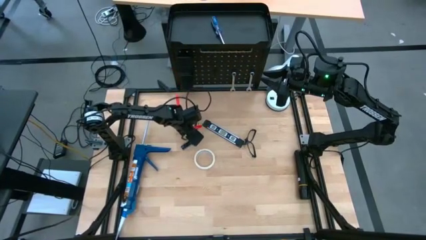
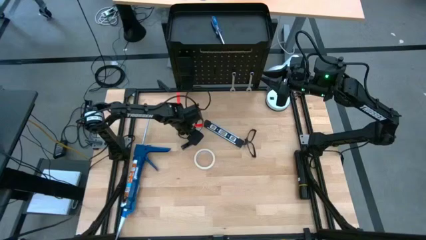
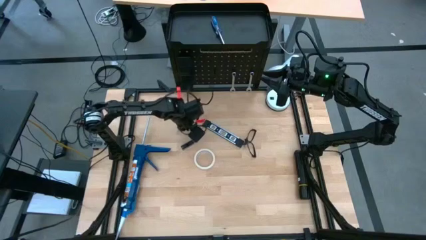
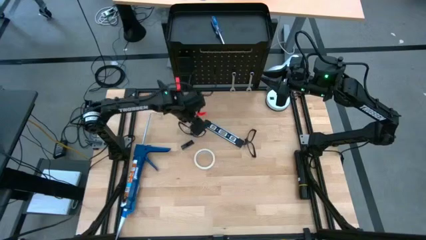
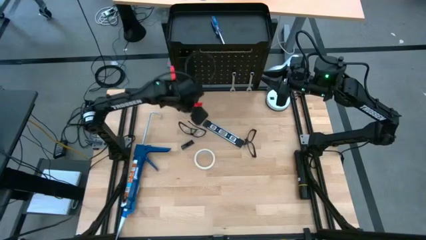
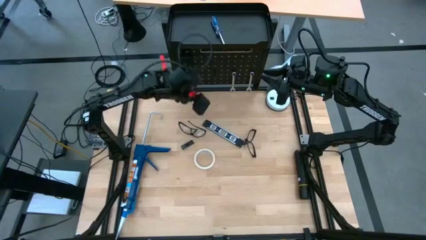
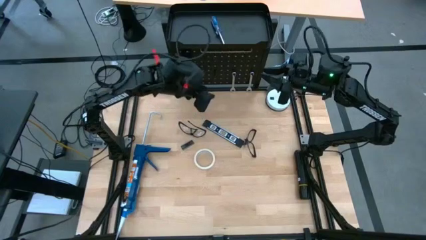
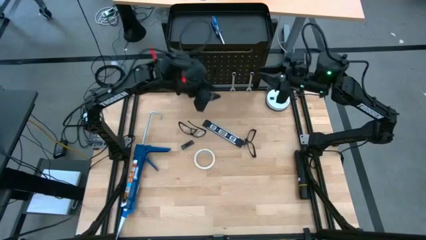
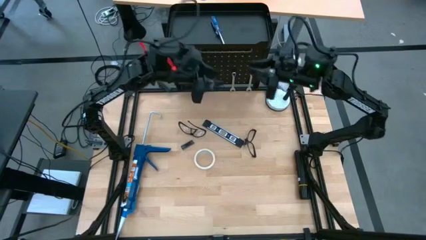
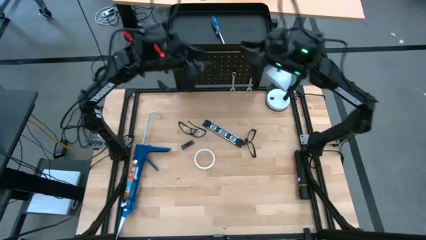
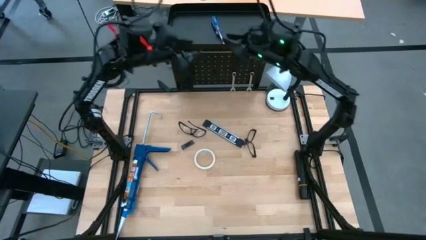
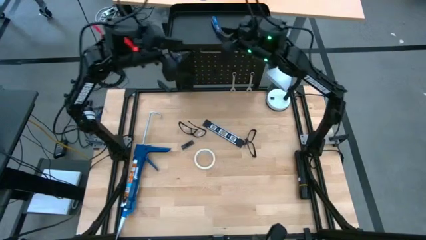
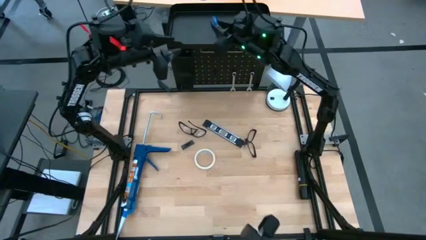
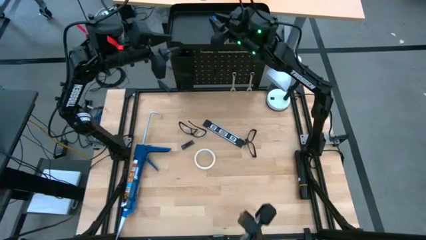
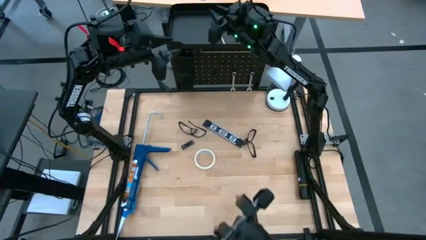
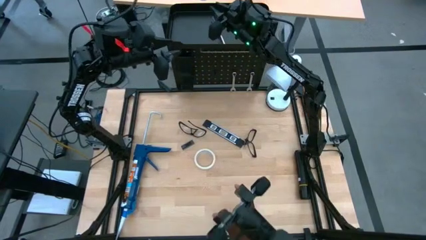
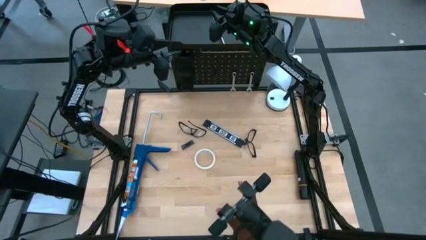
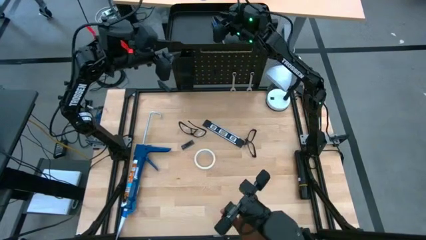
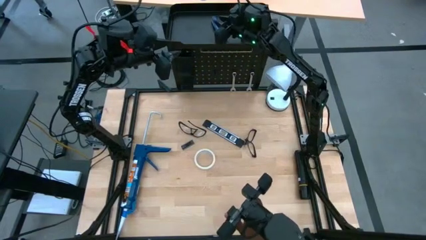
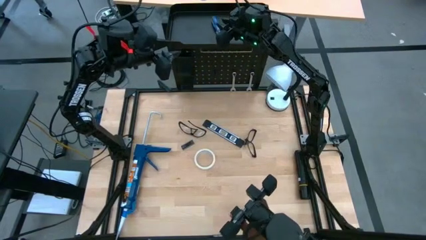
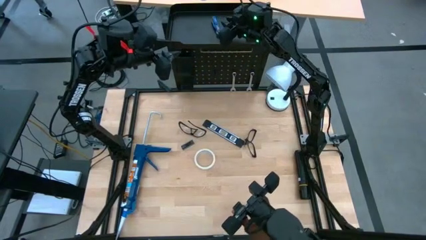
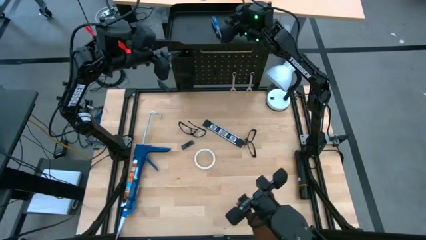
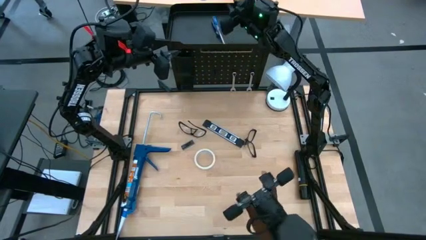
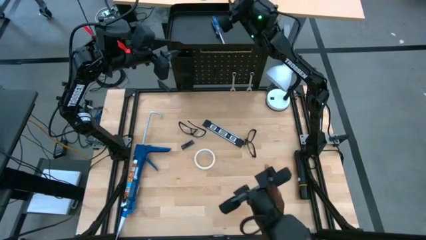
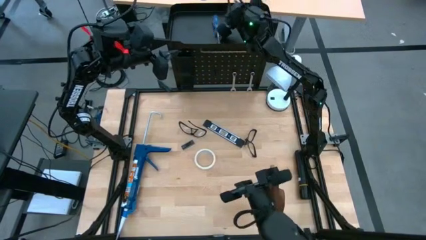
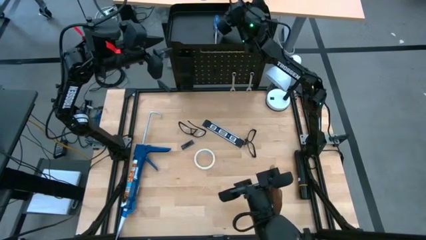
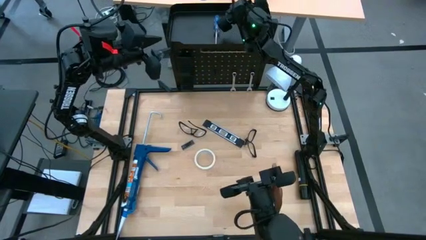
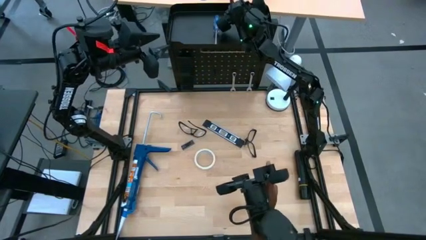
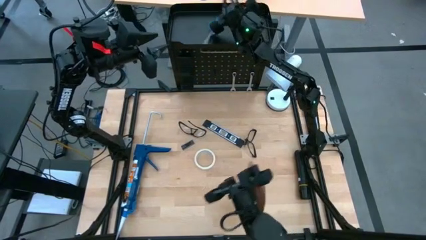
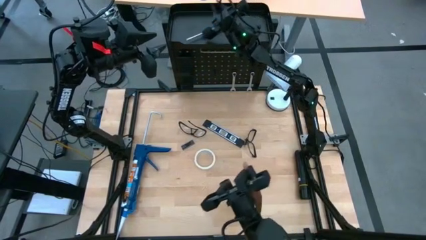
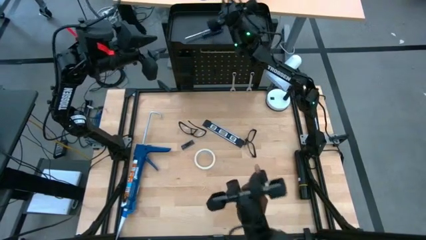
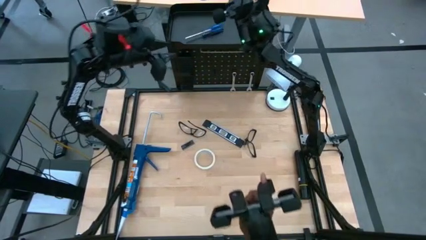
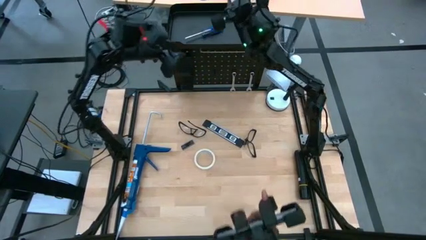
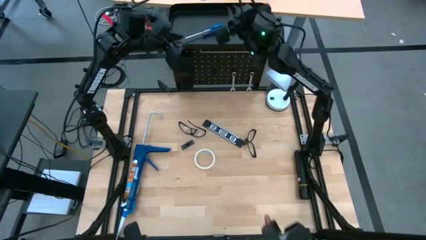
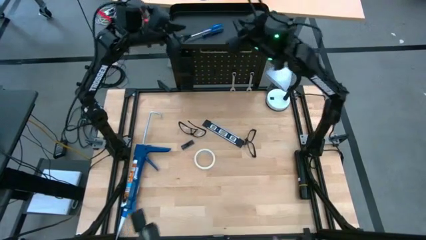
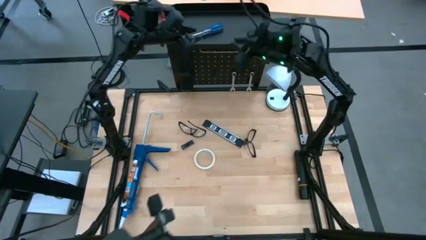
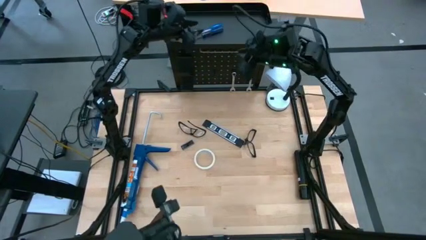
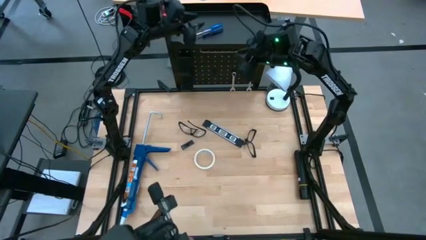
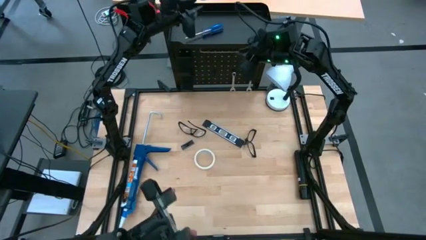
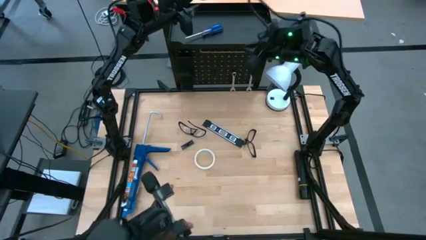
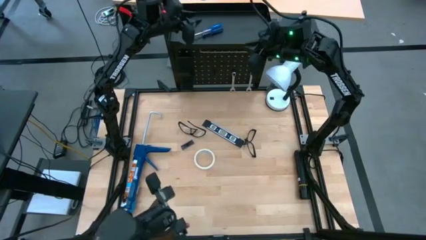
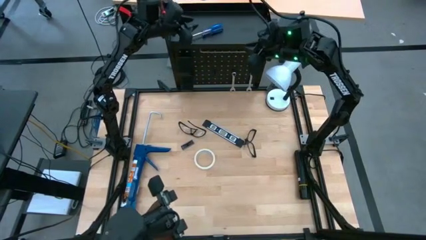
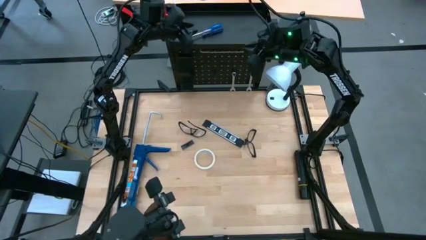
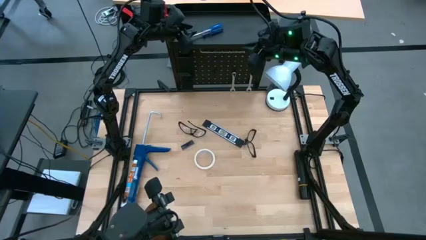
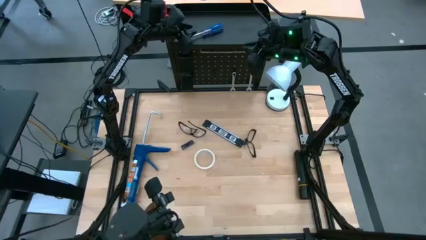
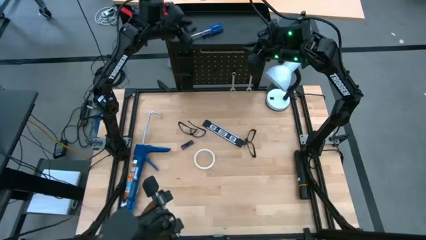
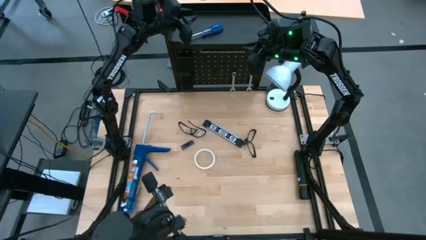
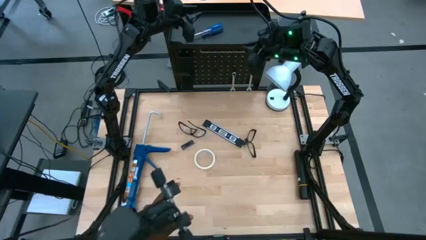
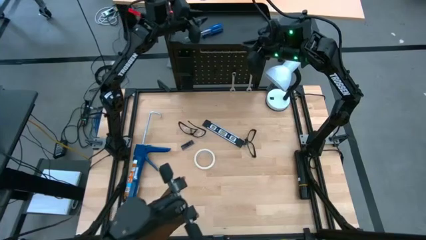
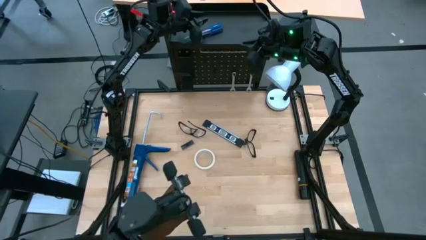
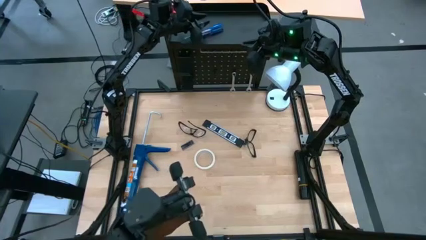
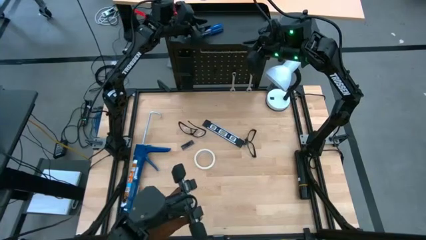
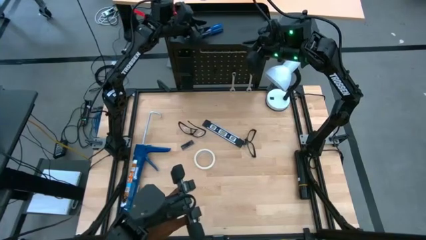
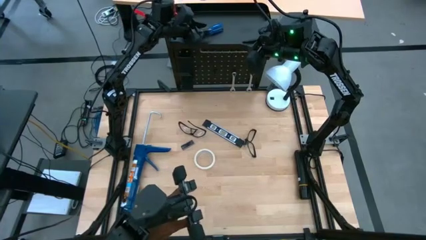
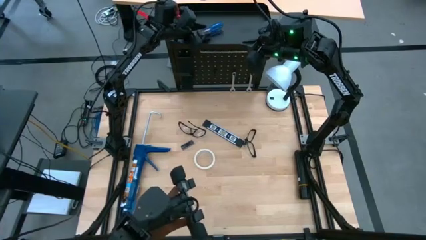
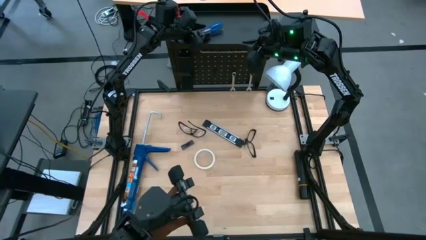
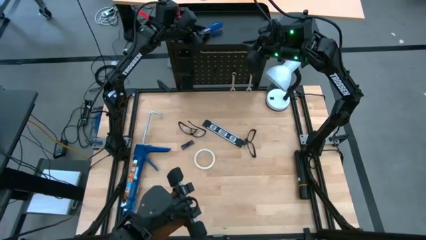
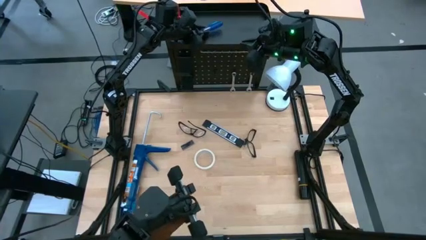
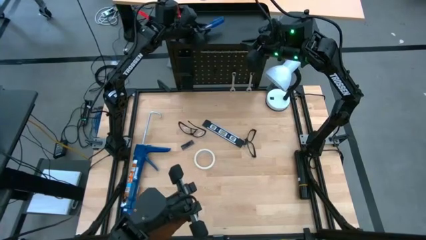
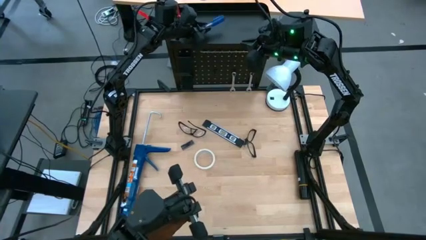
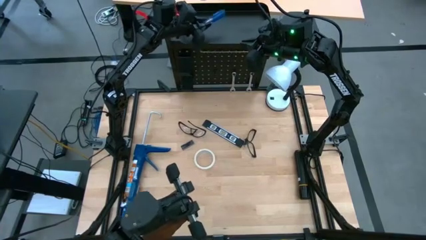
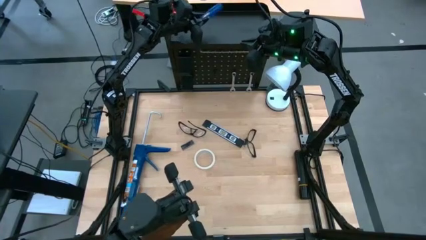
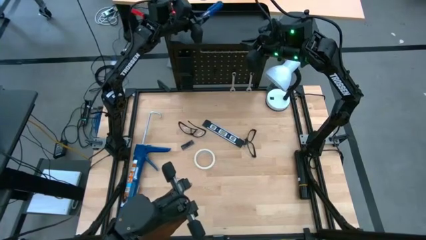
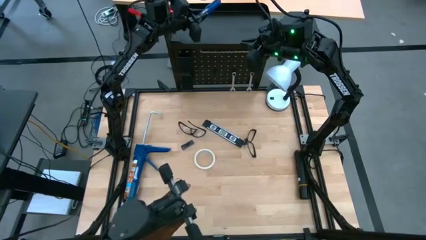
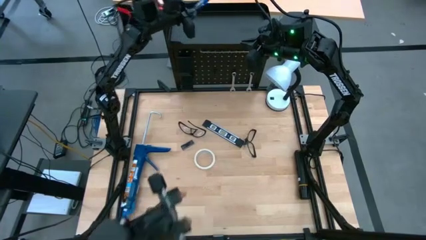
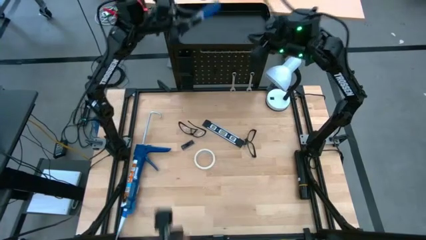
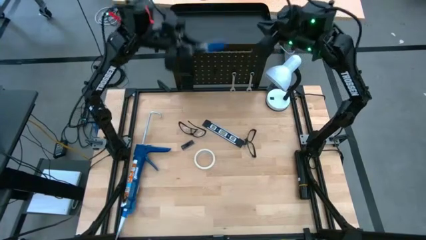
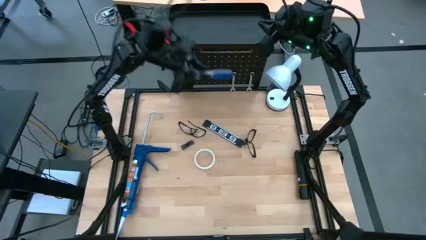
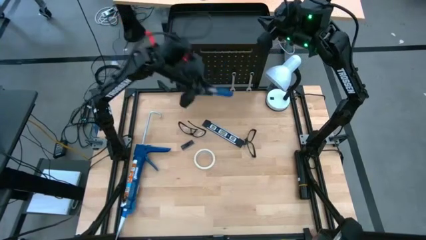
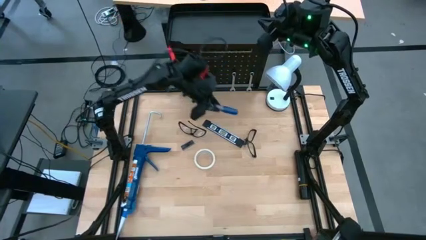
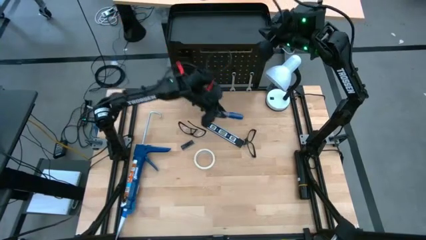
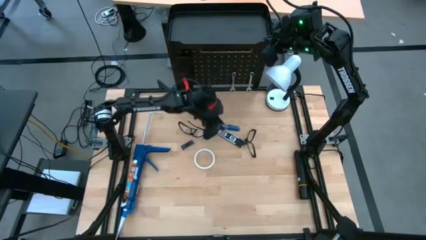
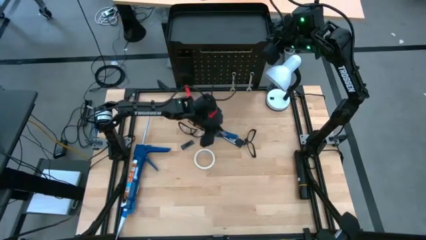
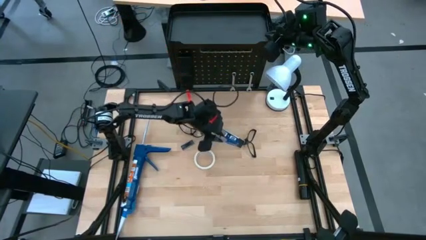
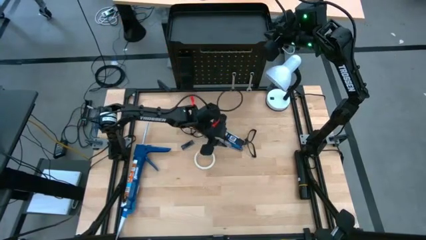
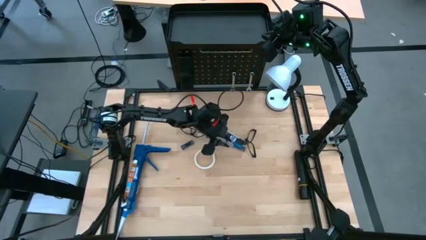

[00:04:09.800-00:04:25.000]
Task: Hang tools onto peg board
Remove the blue screwdriver from the top of the peg board
